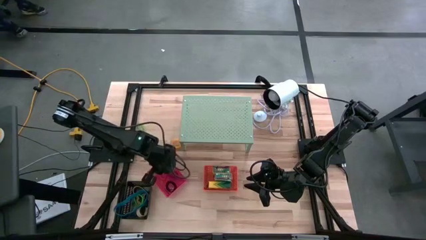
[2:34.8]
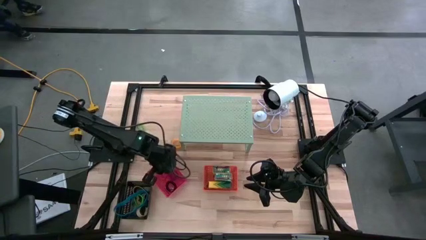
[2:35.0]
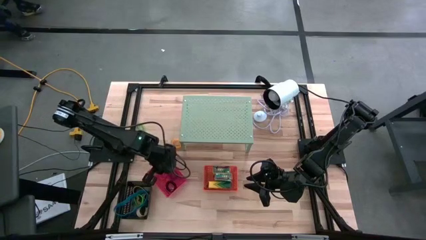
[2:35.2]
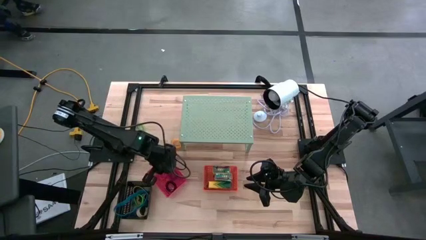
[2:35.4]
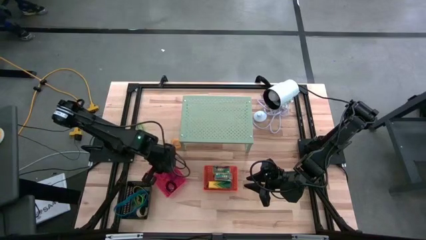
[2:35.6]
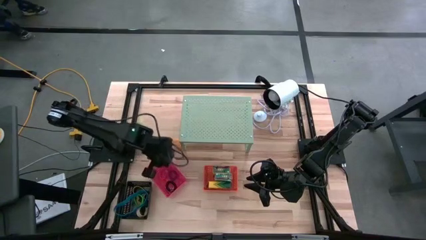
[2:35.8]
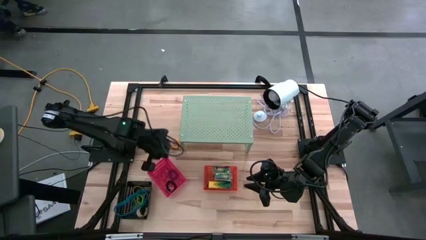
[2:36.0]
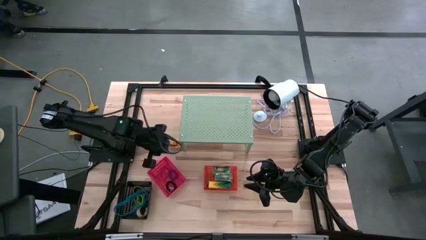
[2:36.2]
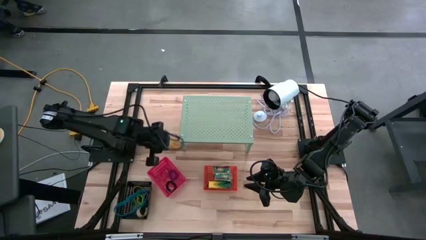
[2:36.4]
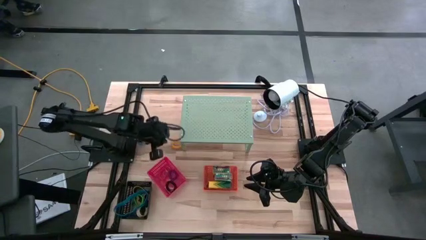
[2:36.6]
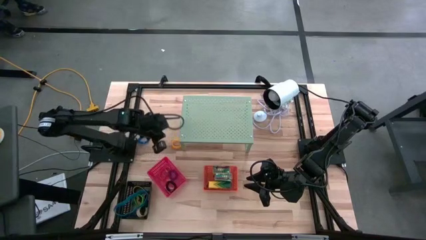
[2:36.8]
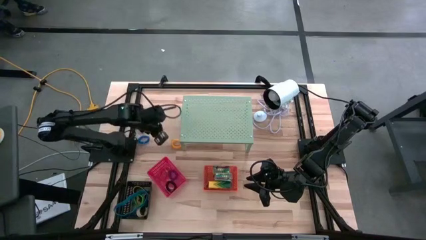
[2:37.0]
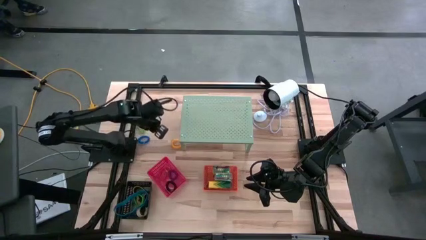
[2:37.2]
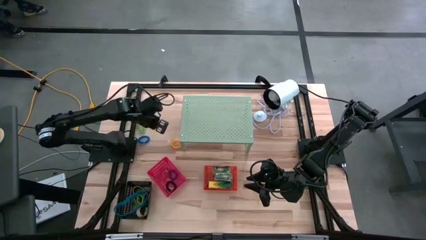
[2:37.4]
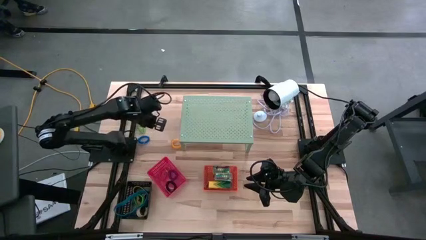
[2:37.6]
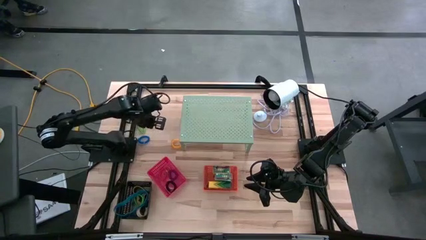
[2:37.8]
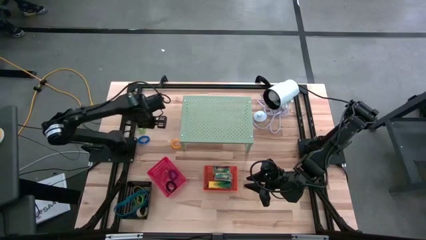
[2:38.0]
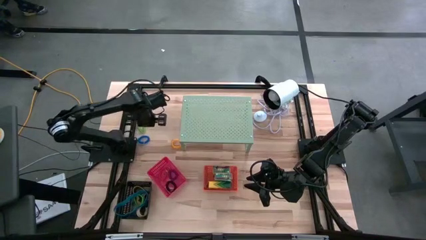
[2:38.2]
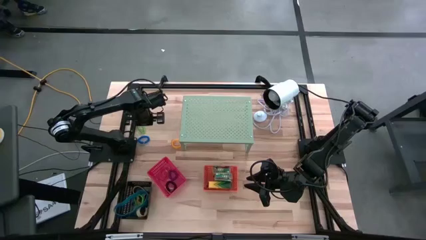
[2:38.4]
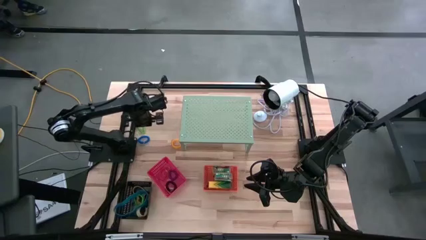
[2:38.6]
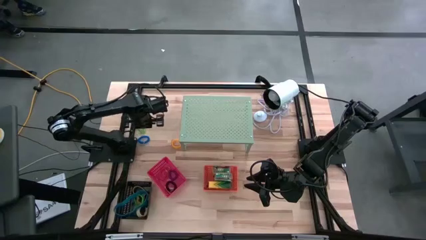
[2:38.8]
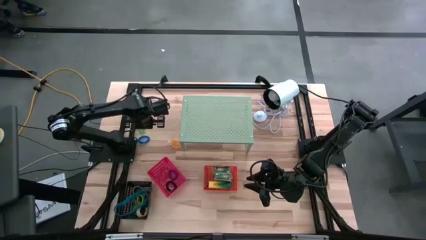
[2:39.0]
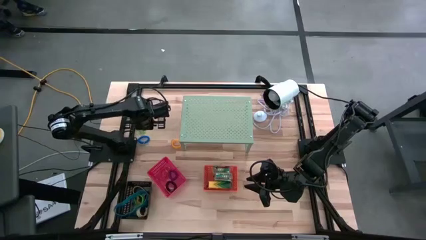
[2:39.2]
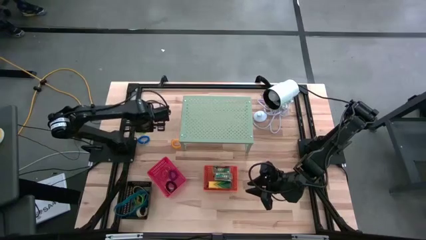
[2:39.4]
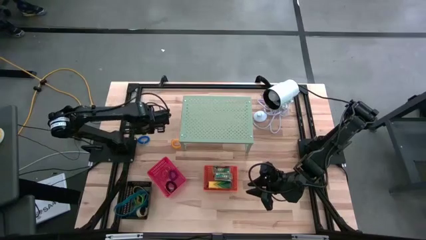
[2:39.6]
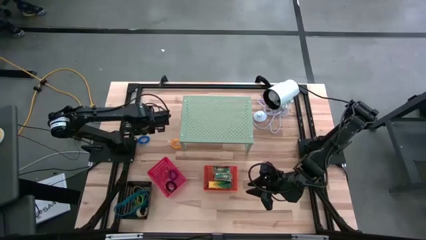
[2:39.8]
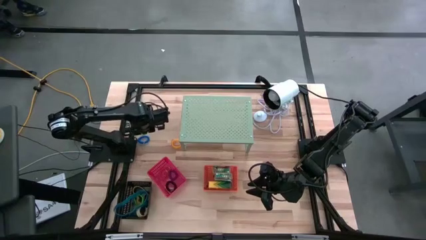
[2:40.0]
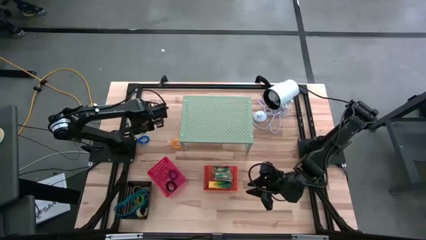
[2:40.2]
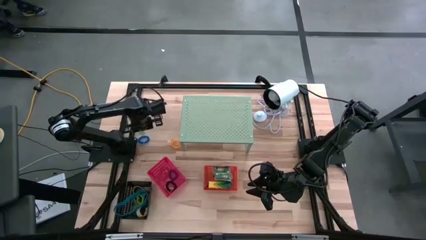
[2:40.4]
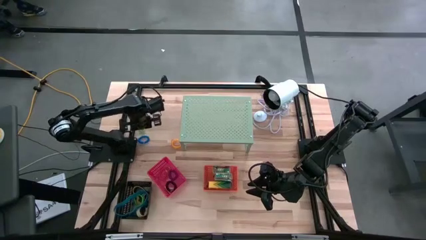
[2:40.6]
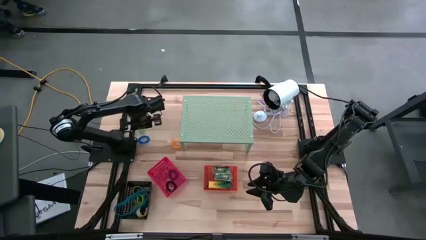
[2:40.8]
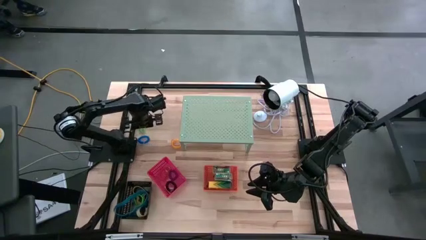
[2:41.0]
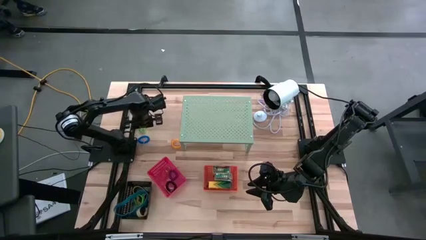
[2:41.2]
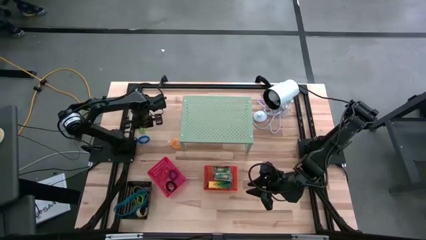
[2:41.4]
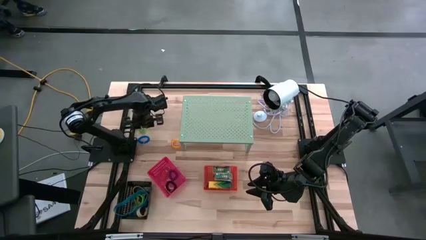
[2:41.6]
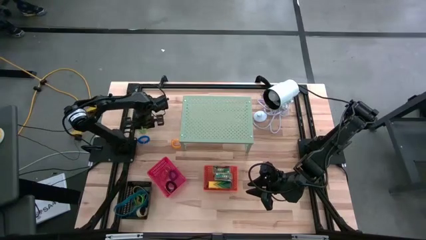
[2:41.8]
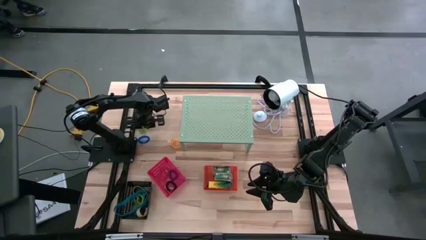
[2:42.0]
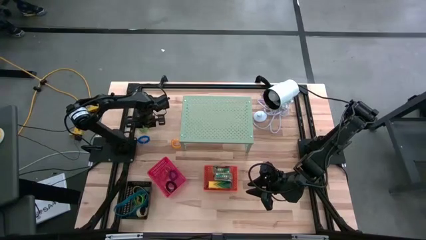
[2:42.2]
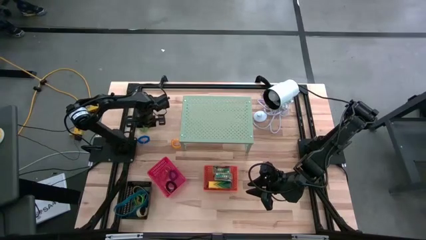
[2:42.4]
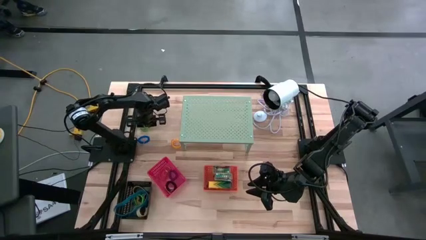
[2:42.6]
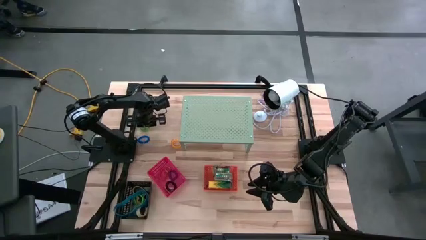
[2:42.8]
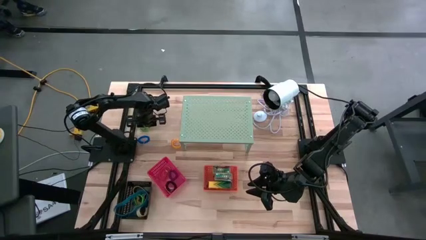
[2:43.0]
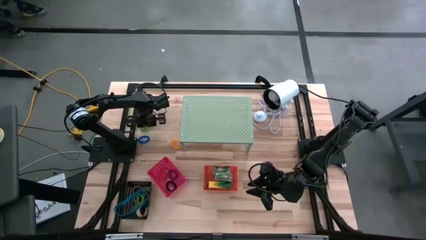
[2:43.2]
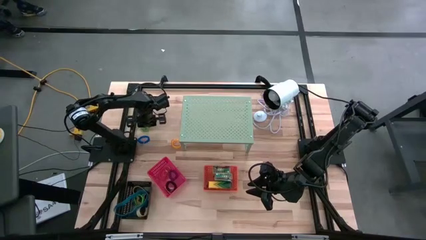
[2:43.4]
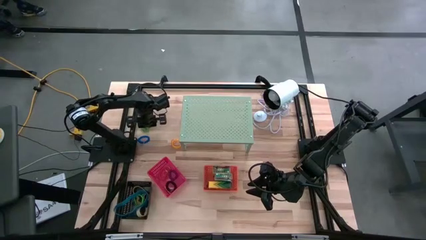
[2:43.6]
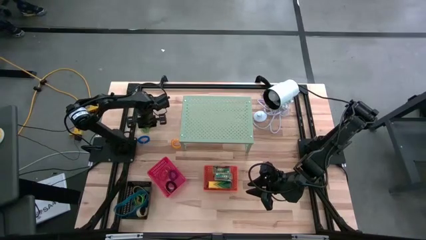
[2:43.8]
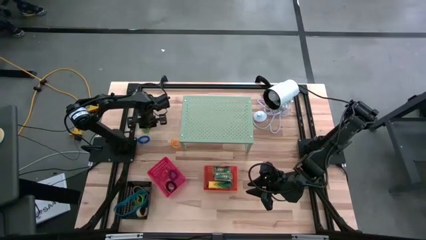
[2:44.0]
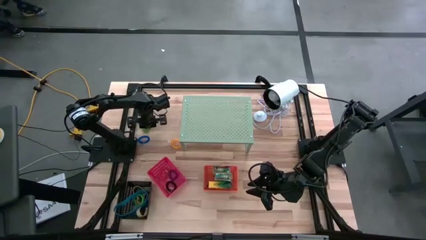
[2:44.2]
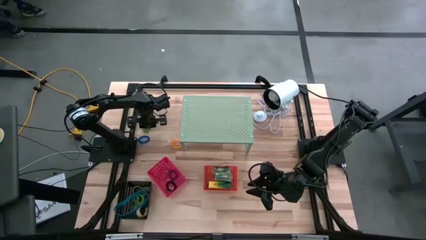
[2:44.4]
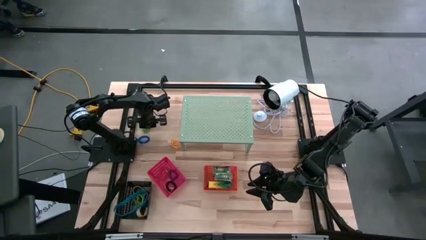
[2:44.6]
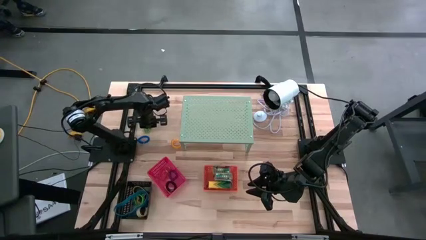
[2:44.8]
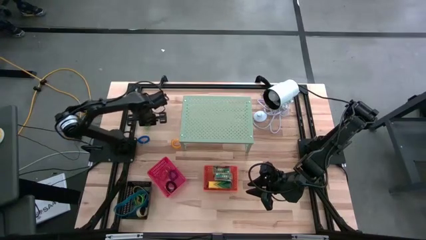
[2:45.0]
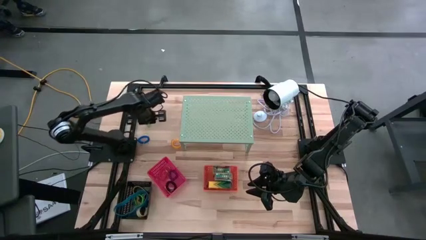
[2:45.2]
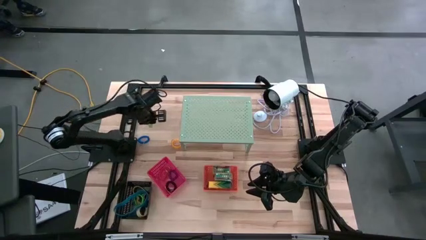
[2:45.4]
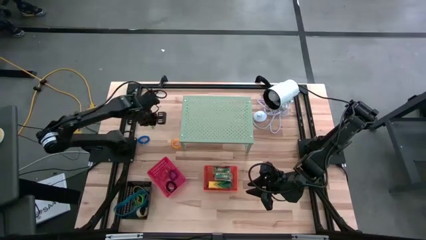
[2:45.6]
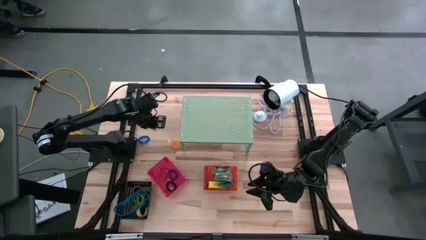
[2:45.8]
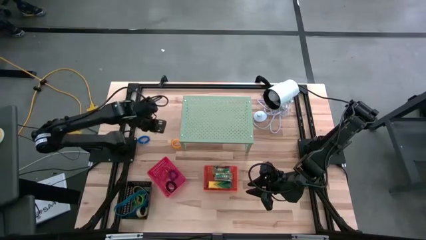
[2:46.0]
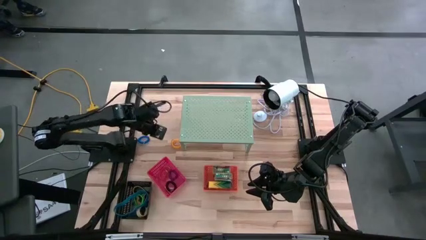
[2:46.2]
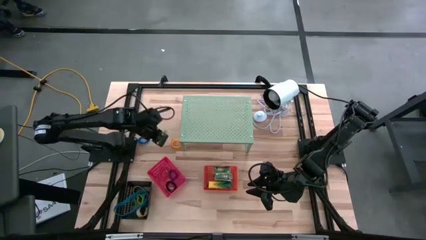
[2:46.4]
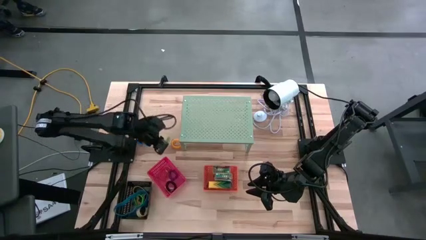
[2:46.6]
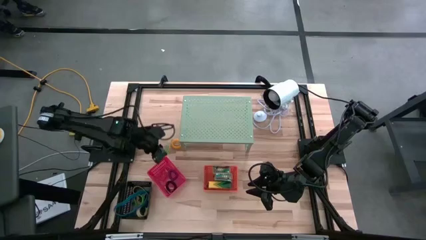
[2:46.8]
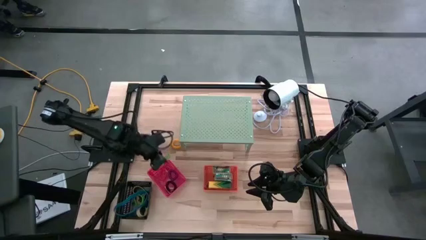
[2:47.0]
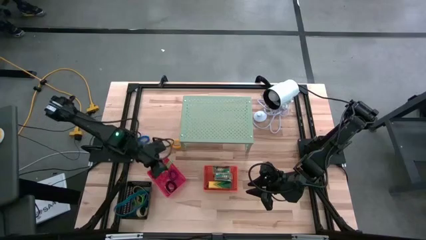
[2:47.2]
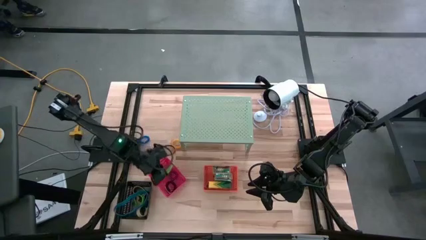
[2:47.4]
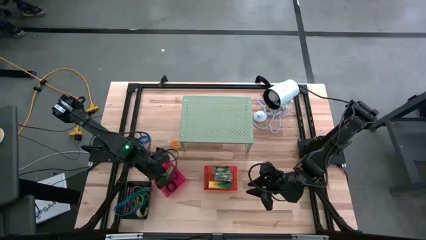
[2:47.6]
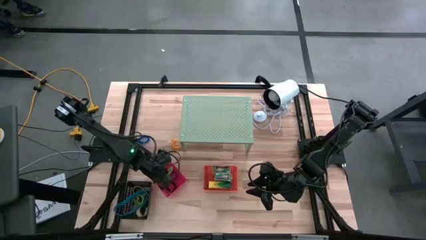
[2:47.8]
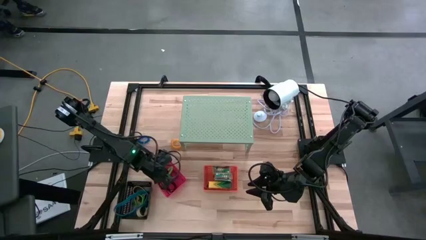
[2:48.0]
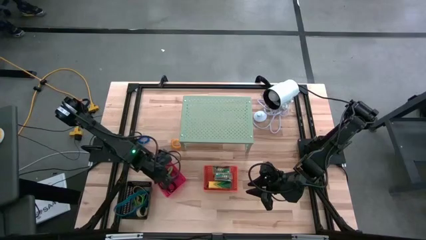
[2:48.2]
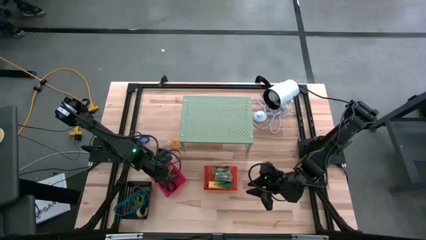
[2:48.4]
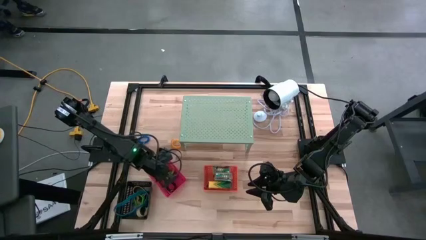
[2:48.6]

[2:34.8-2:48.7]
Task: Pick & Place Office Desk Supplies
Put the green spring keychain into the red bin

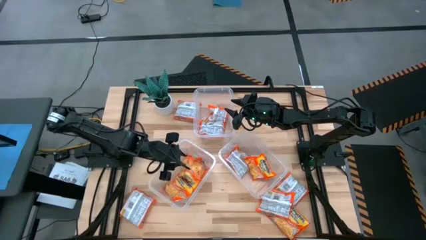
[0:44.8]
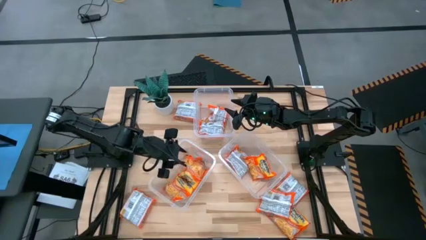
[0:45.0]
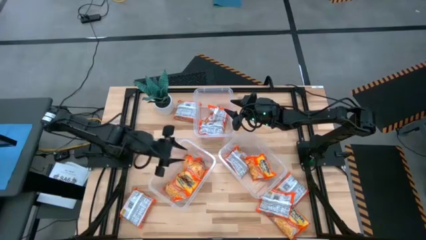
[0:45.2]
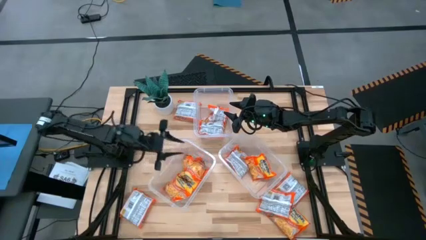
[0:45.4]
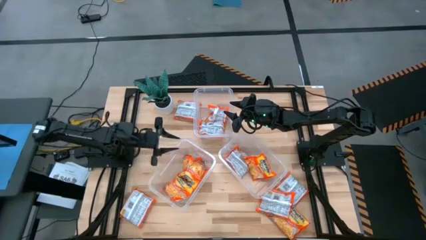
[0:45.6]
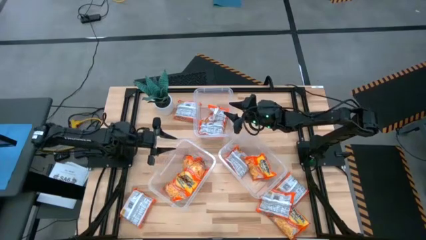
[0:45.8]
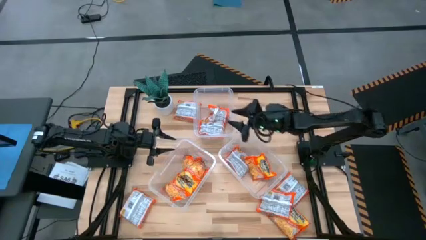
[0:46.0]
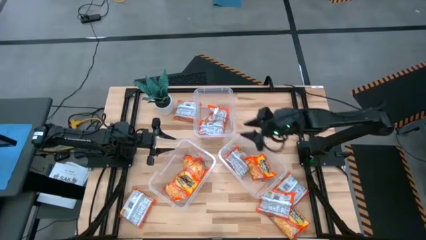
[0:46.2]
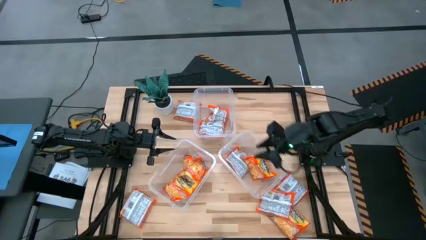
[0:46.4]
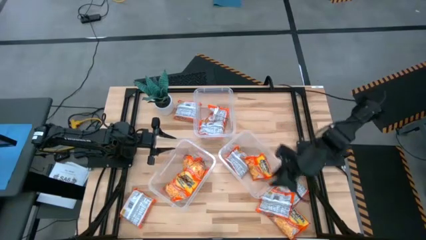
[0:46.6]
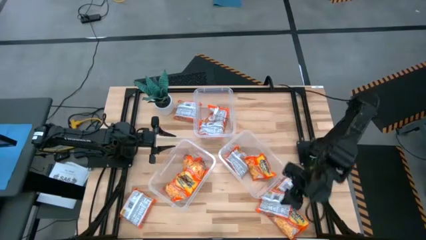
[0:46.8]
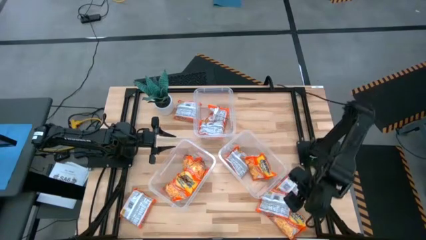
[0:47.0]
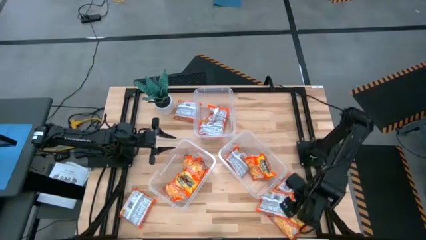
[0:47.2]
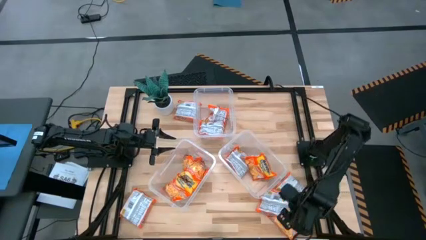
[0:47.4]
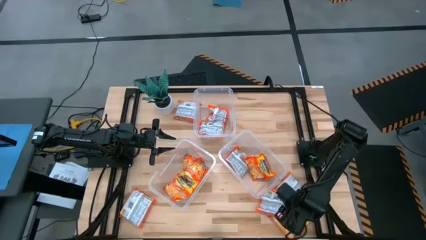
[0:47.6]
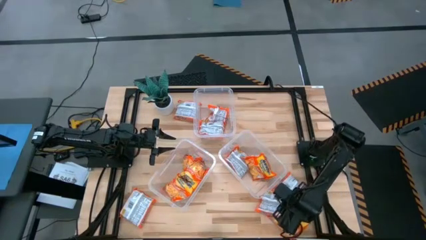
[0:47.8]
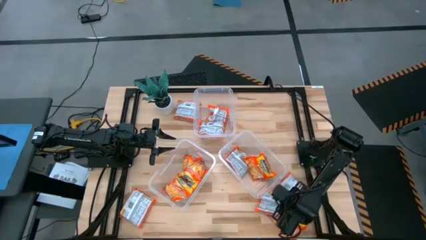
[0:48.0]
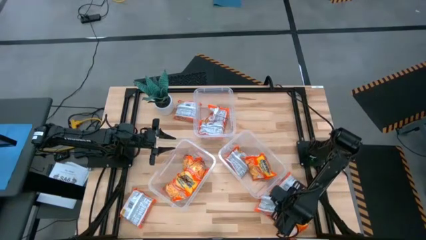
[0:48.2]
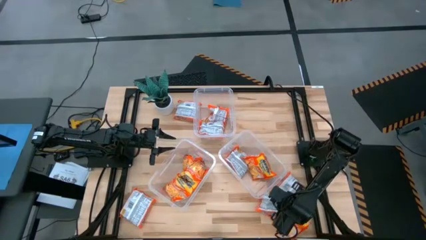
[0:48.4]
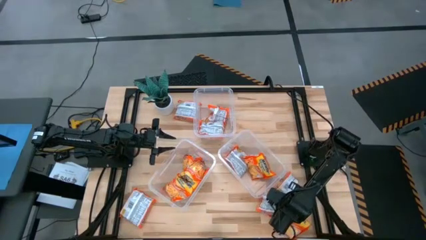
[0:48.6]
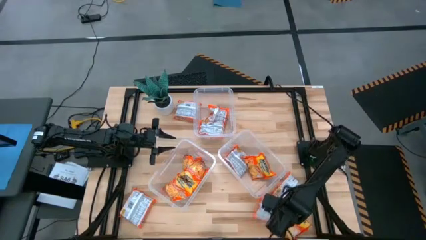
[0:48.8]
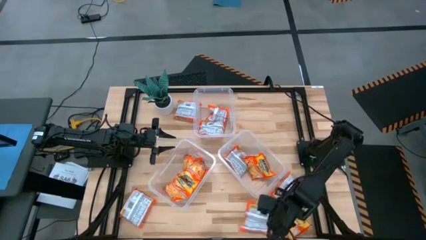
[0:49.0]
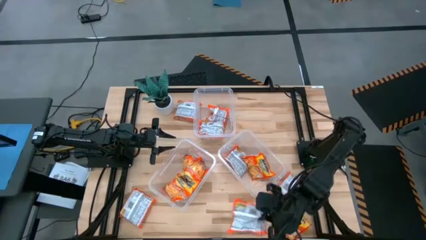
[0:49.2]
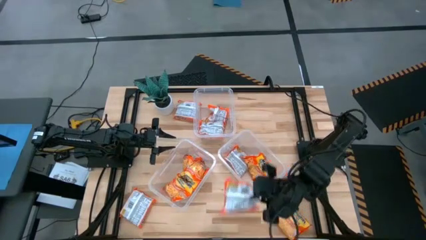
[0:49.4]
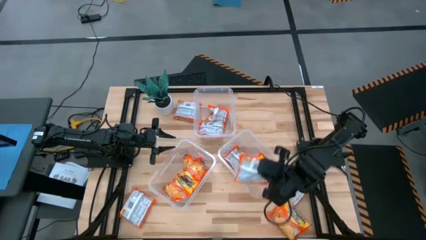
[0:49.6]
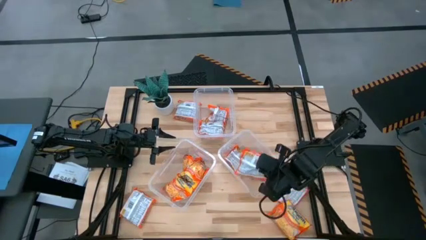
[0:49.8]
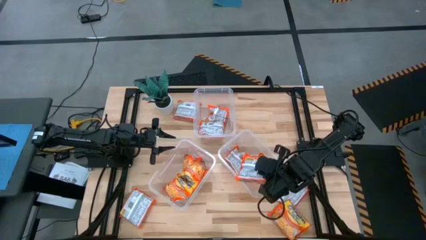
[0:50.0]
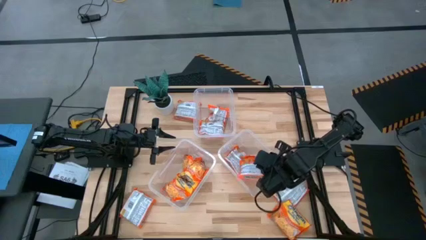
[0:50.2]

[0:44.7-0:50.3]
Task: Sort Maruchan noodles
Put the noodle pack into the bottom right transparent bin
